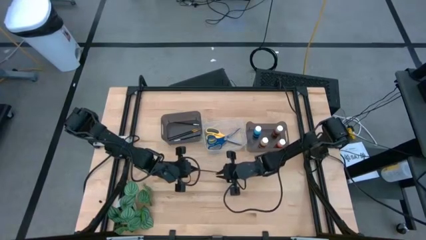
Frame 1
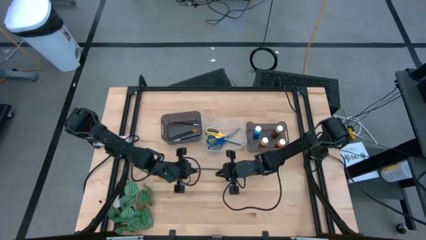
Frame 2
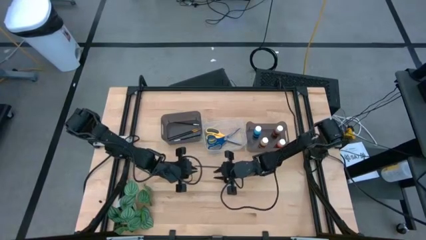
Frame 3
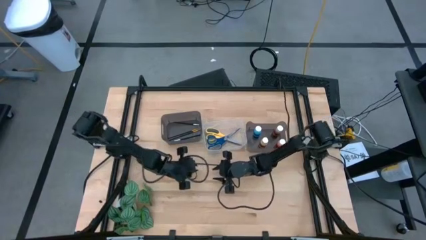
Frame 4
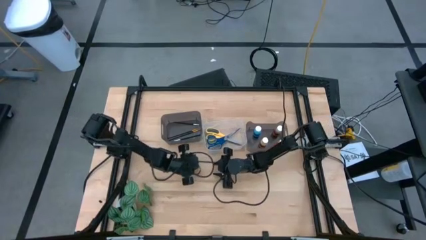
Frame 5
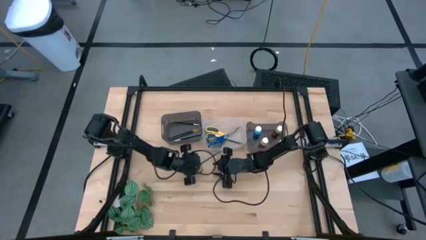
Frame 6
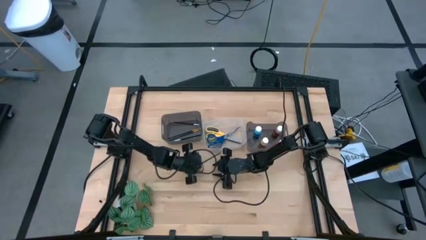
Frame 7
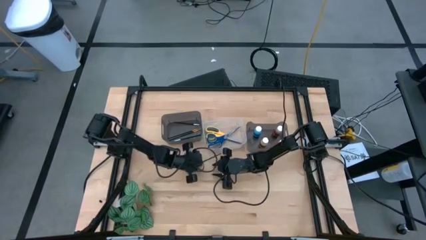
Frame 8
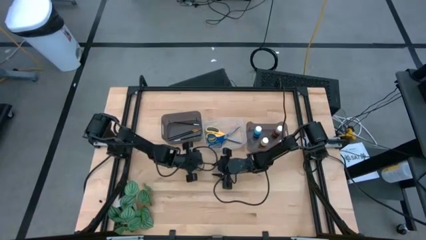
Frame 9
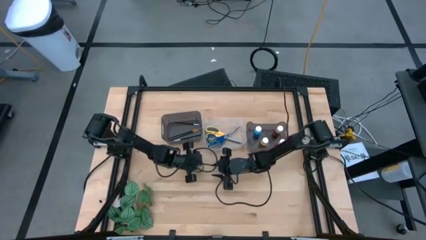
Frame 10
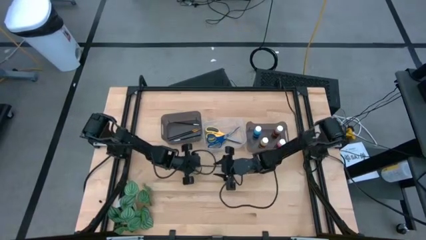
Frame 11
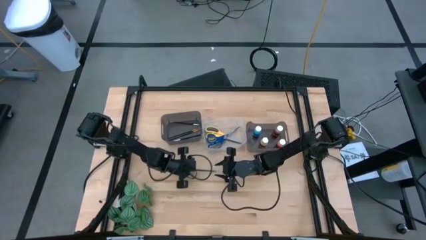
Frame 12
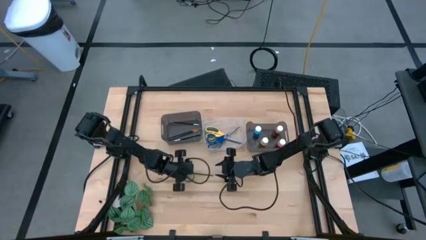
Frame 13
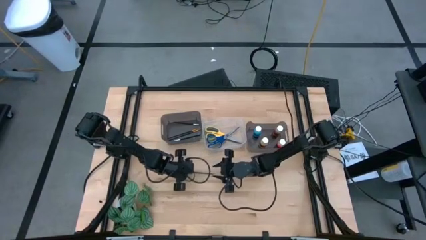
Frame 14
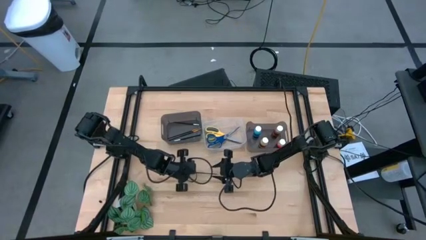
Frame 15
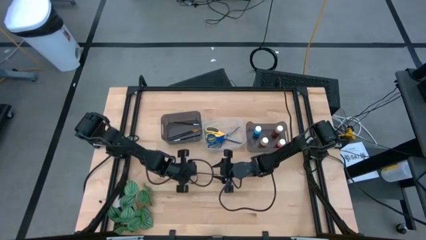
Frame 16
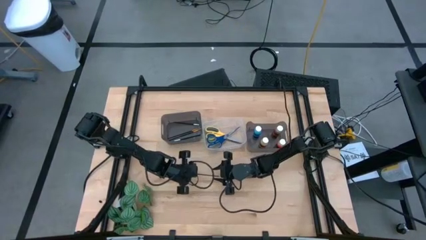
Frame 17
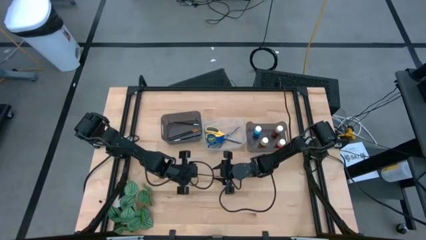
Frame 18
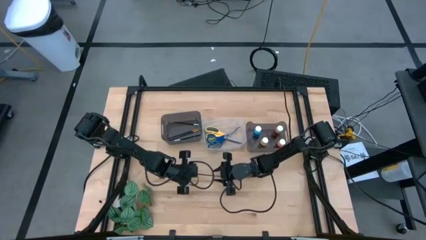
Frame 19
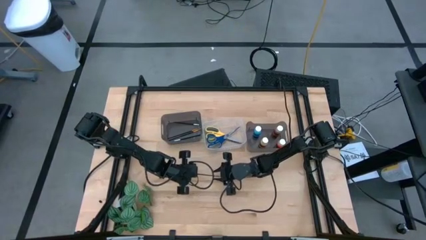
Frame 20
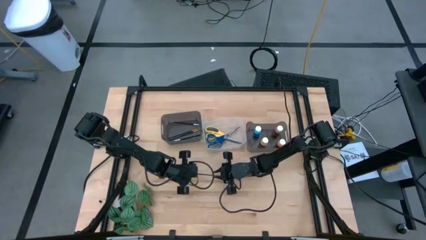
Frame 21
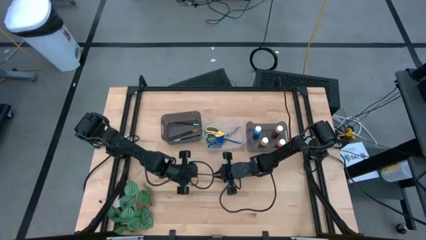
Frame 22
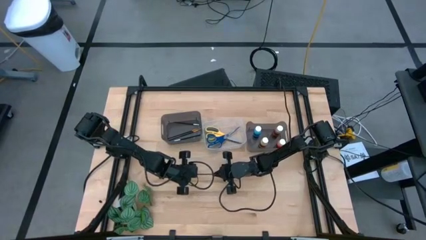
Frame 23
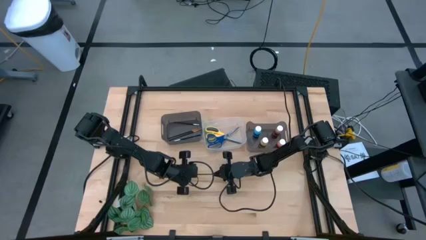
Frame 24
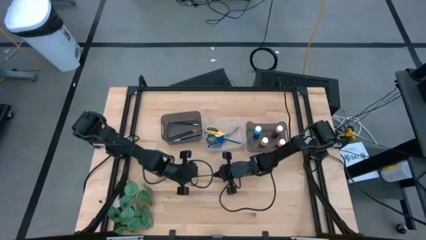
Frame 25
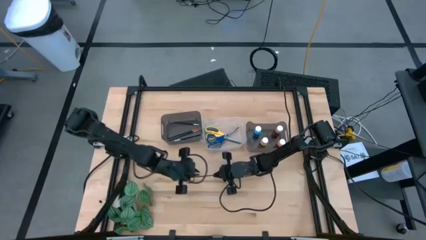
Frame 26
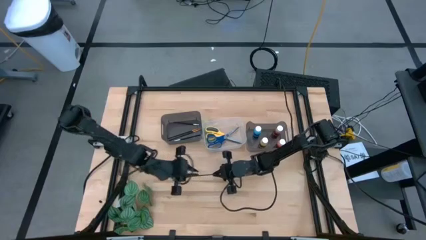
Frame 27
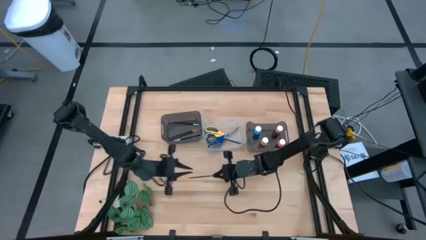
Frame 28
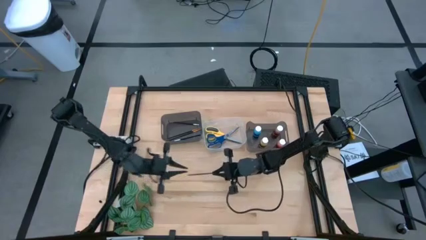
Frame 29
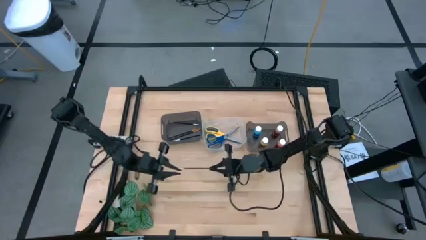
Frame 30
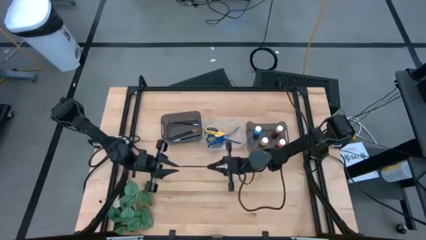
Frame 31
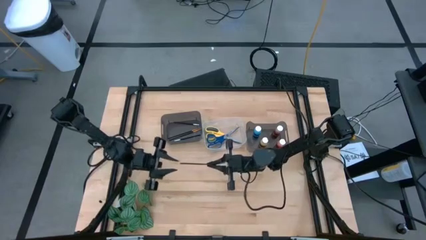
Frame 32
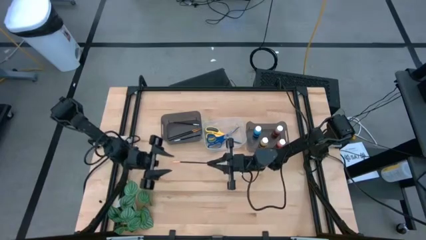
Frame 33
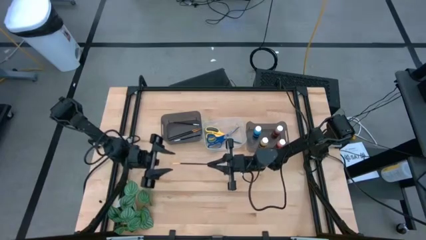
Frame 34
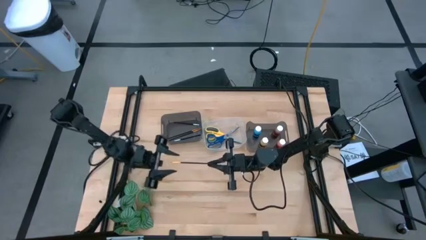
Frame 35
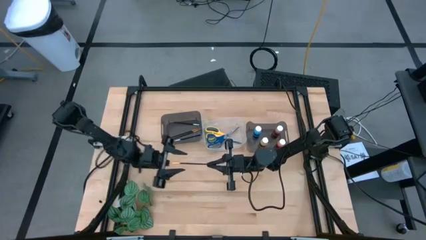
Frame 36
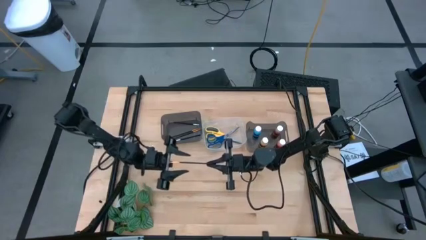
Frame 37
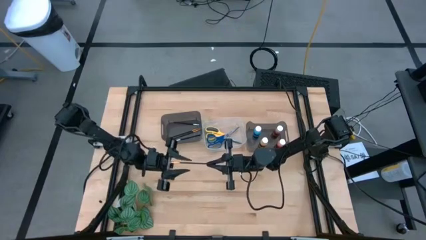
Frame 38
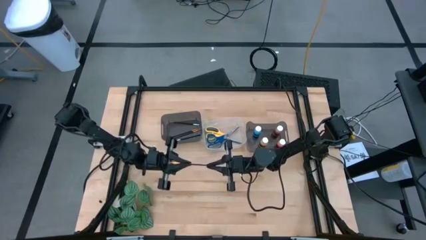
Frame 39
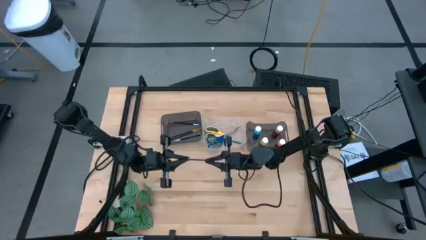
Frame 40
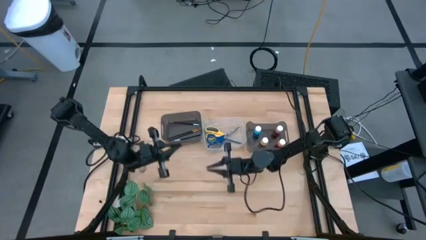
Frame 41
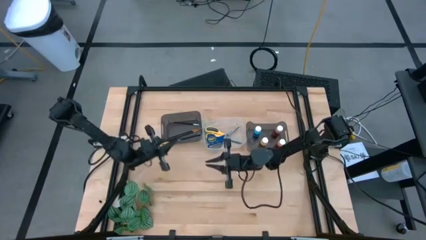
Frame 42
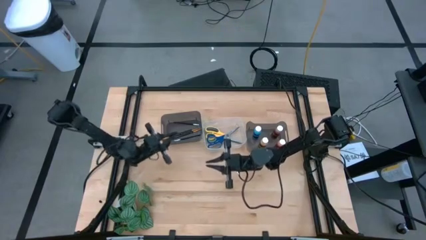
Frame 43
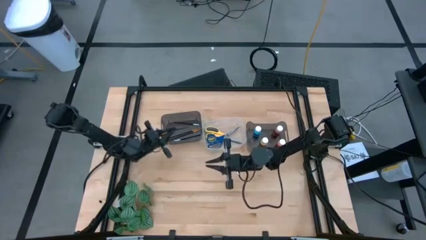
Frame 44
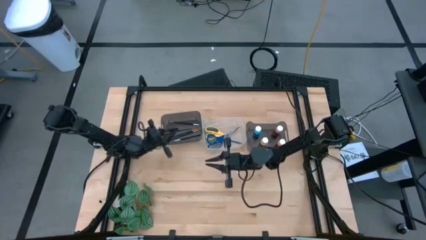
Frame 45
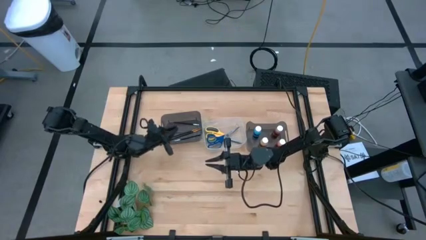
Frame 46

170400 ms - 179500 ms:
Task: Pick & Place Paint Supplies
Put the gold paint brush into the left black bin

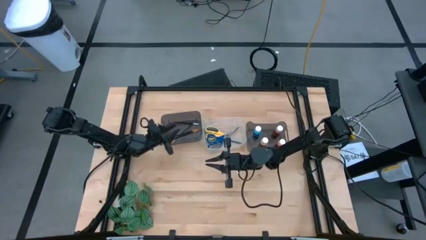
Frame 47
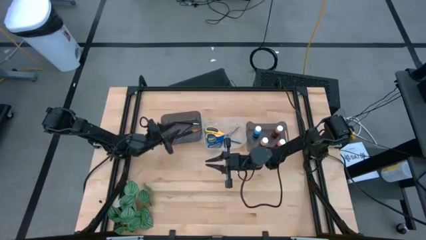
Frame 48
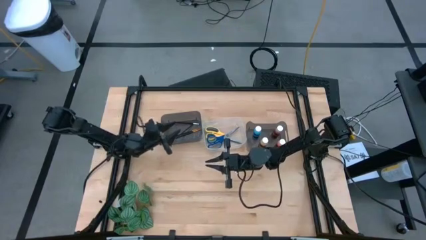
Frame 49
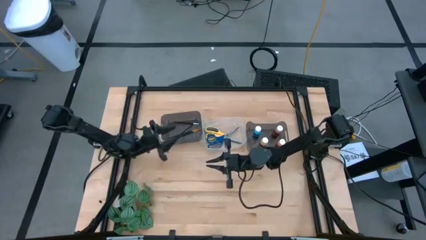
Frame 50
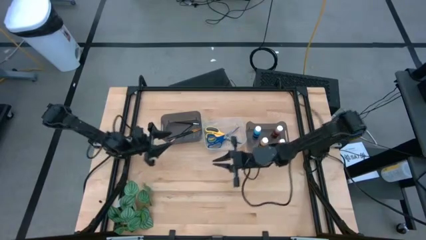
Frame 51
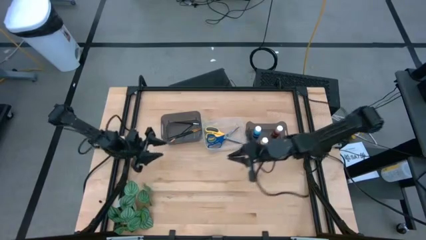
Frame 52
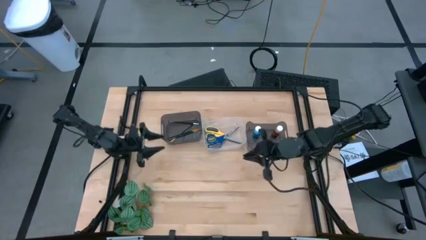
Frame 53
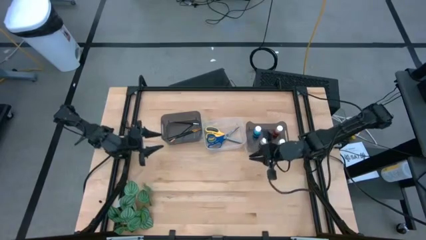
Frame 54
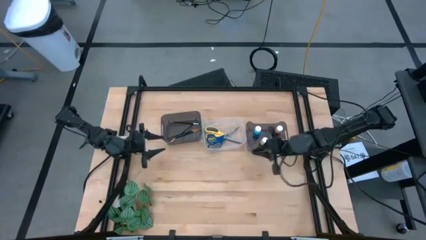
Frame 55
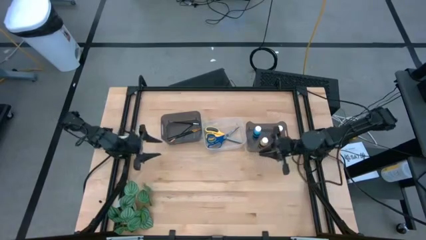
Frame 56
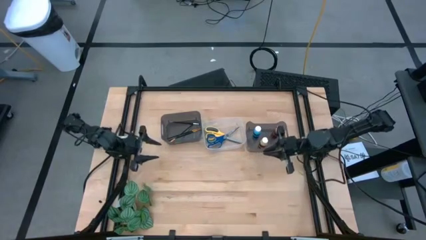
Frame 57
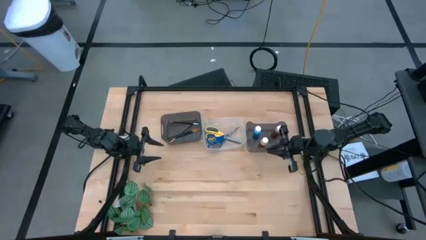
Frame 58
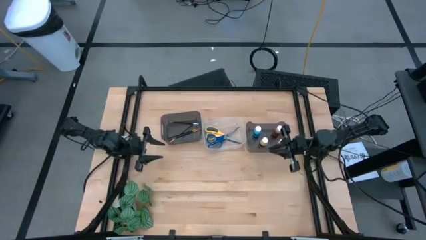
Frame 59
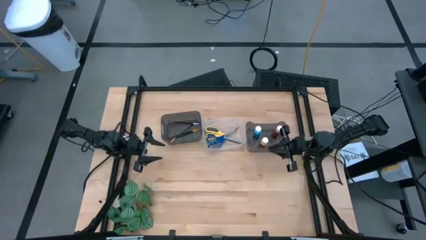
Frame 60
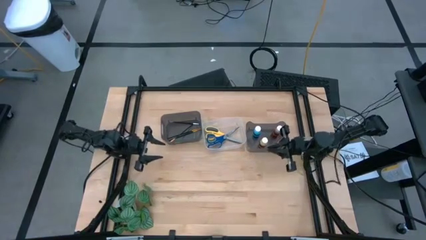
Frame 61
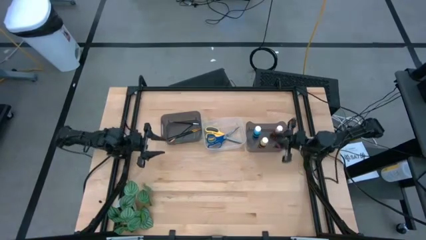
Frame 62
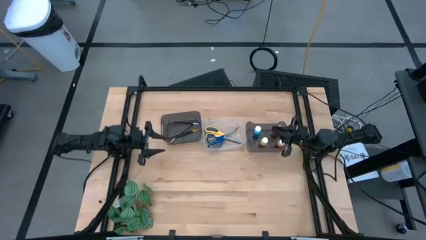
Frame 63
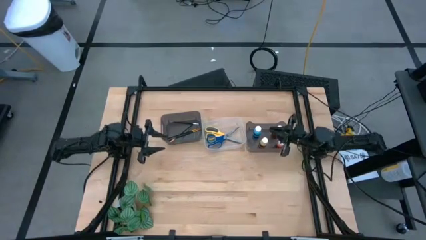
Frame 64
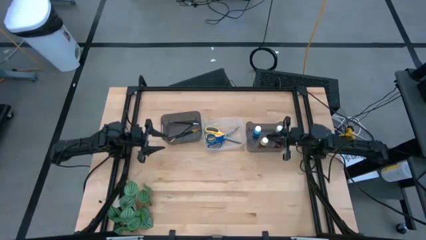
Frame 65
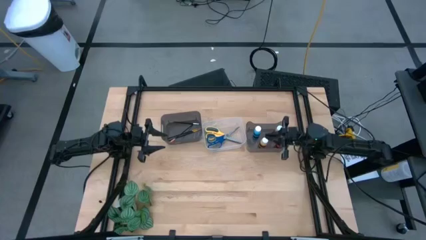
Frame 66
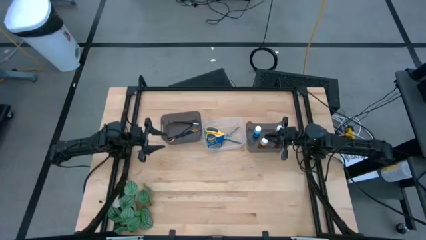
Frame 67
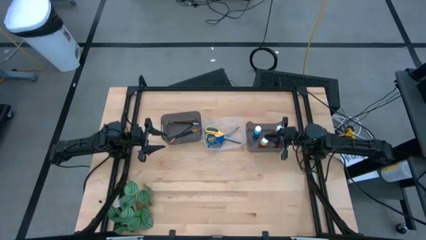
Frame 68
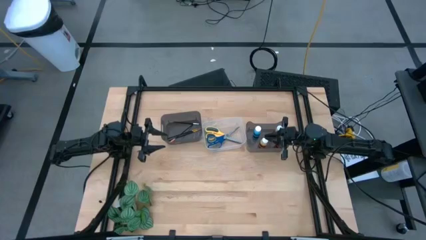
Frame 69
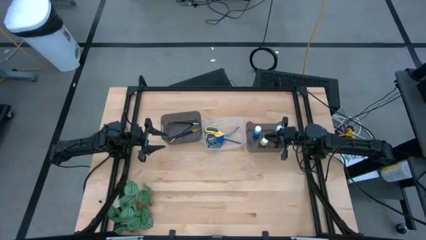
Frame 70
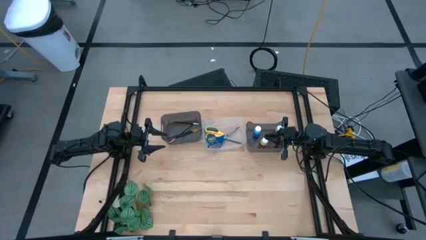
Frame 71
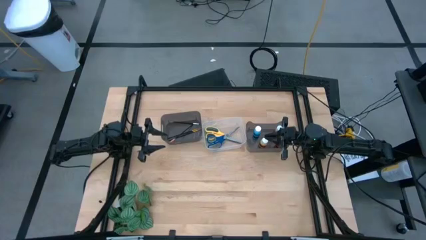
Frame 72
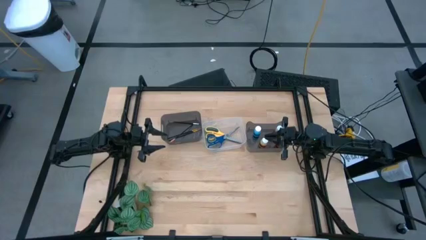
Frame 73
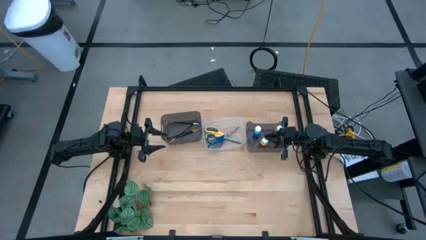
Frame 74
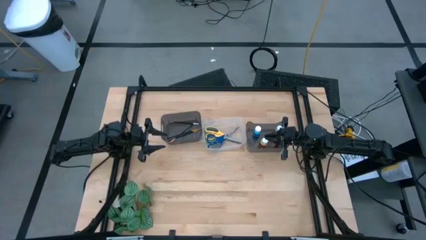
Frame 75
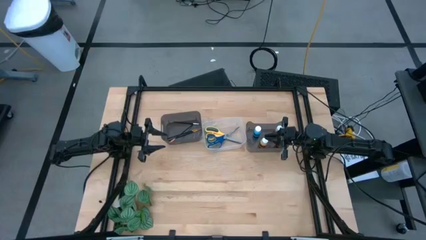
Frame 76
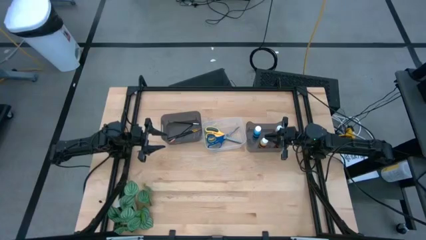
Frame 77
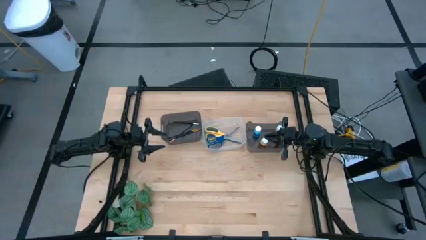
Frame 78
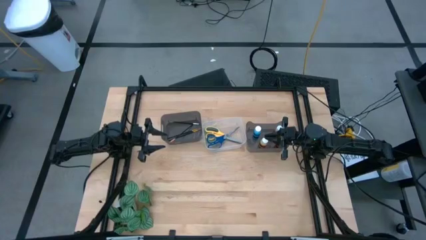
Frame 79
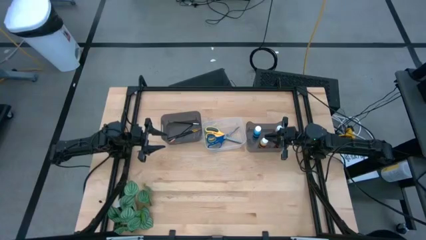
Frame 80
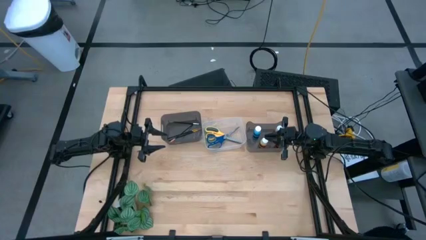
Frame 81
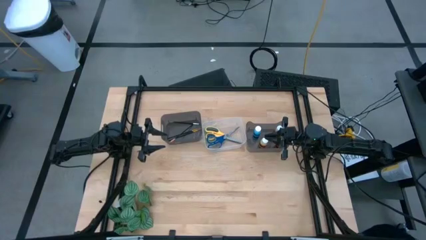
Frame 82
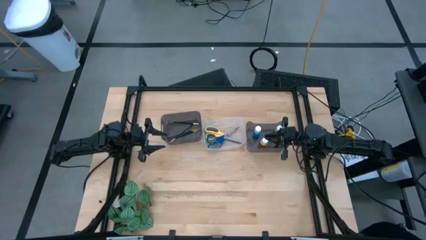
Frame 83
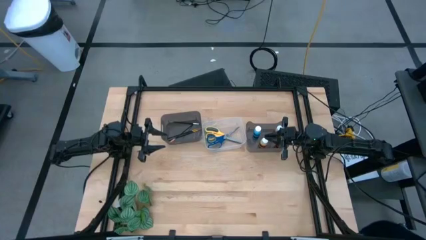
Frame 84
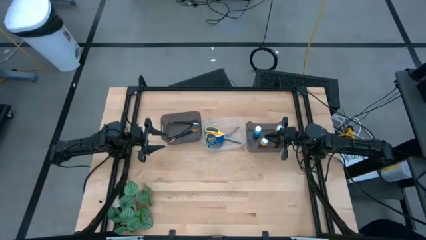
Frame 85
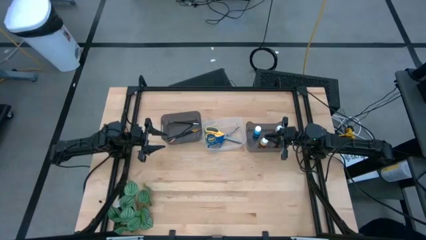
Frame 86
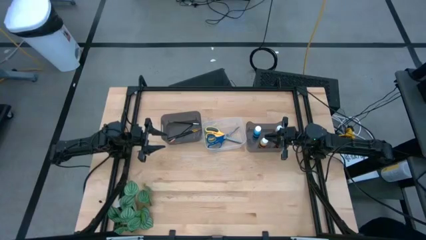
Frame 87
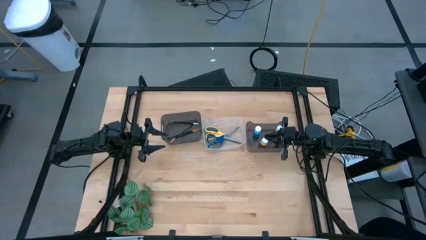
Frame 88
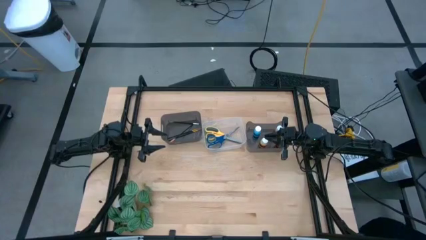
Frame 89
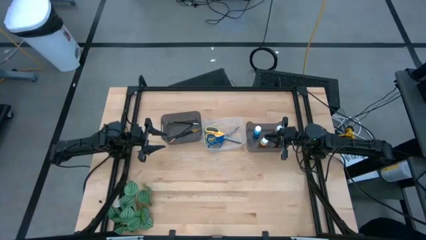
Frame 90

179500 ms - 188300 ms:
Return to Home Position
